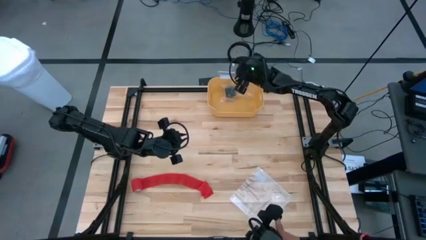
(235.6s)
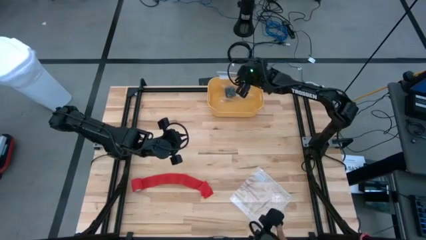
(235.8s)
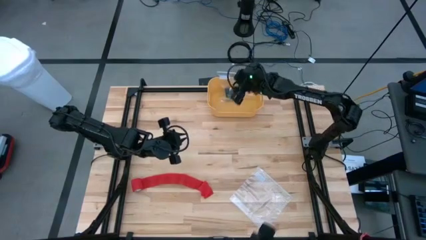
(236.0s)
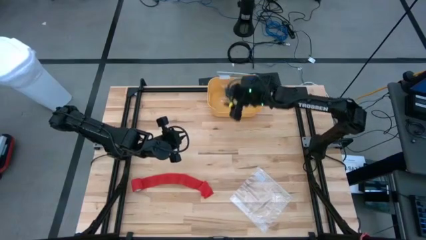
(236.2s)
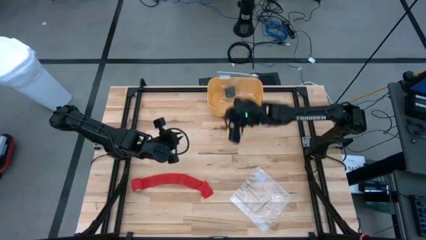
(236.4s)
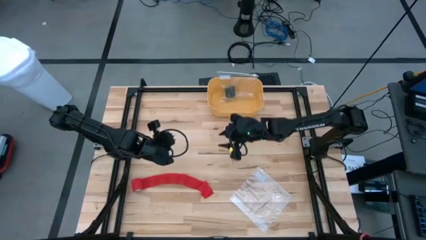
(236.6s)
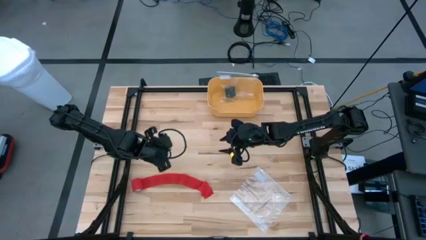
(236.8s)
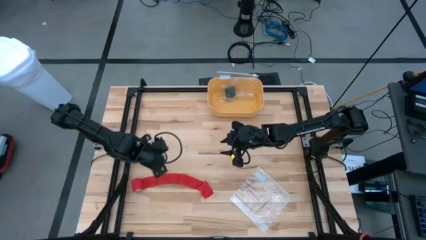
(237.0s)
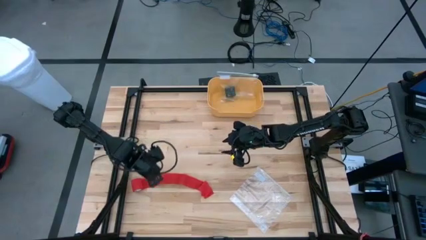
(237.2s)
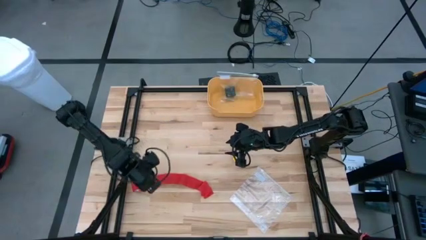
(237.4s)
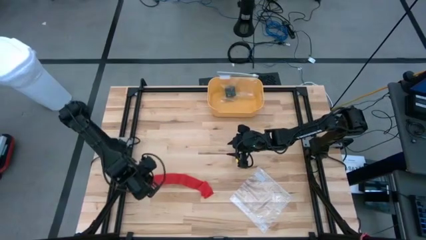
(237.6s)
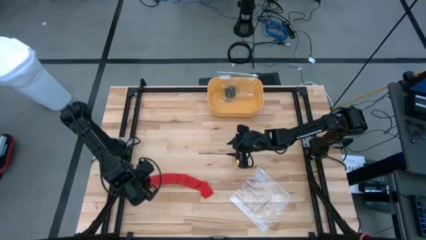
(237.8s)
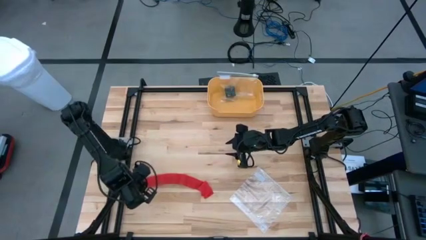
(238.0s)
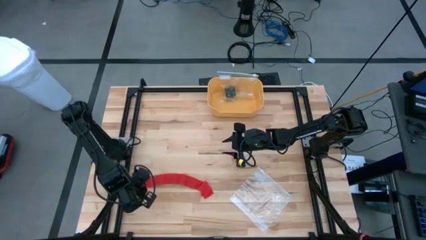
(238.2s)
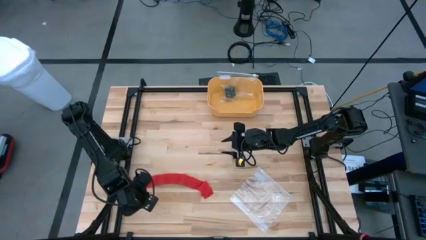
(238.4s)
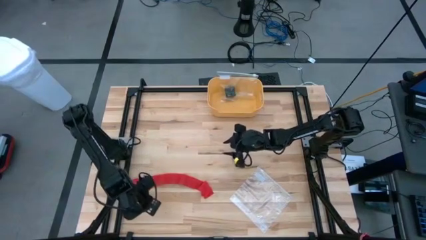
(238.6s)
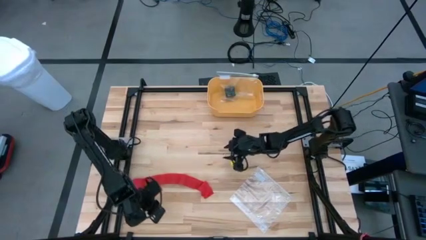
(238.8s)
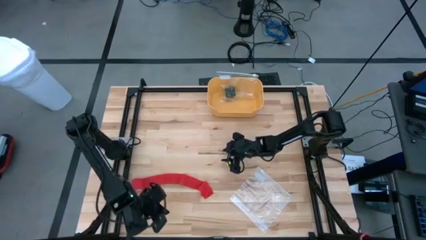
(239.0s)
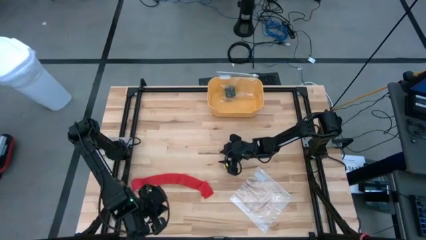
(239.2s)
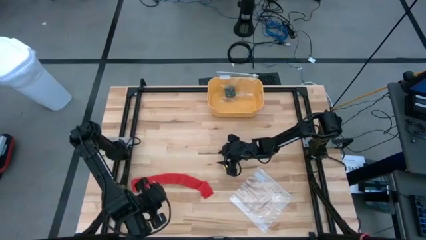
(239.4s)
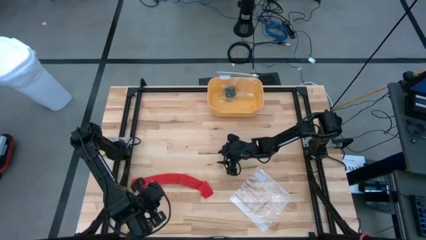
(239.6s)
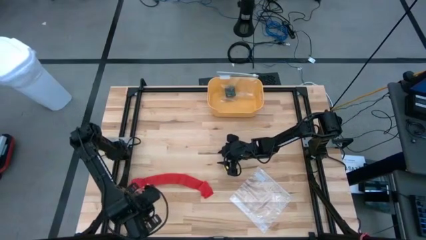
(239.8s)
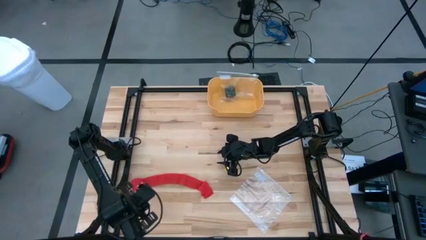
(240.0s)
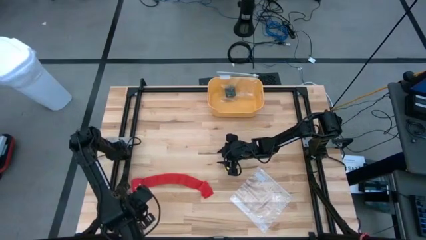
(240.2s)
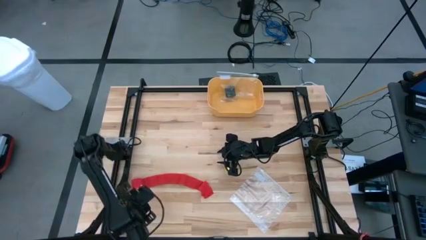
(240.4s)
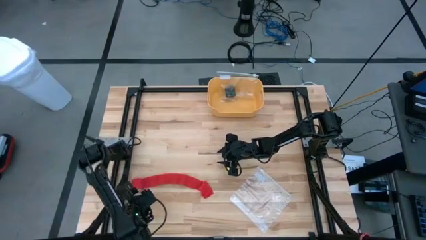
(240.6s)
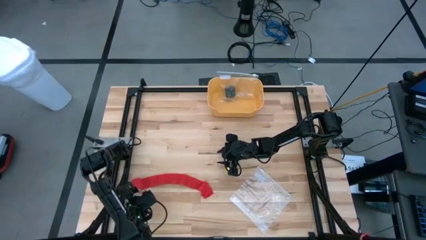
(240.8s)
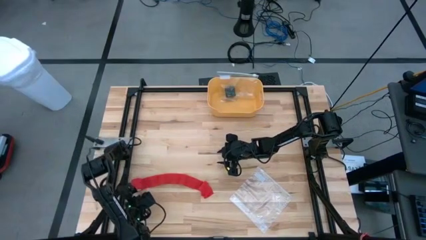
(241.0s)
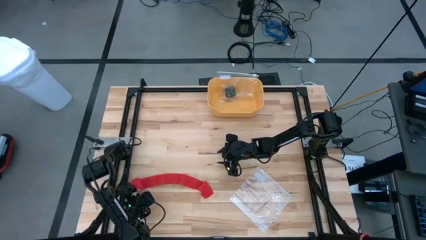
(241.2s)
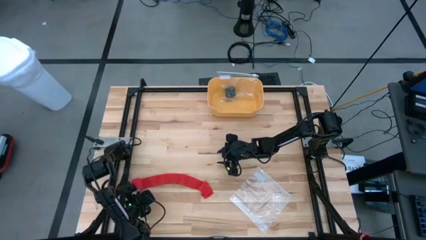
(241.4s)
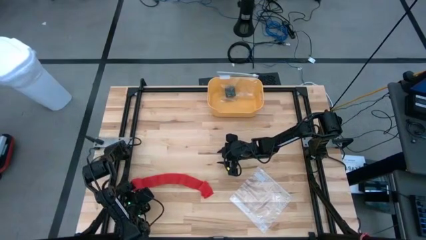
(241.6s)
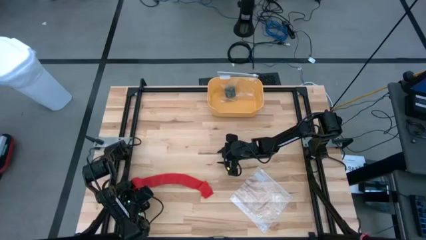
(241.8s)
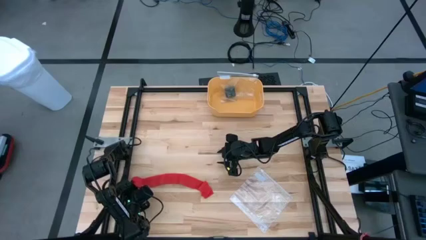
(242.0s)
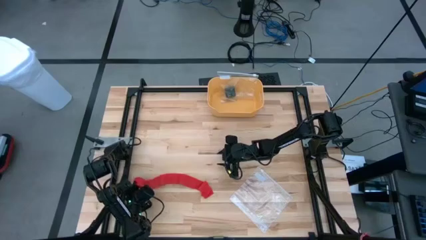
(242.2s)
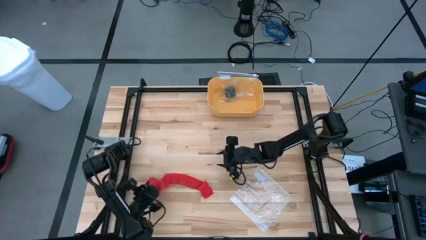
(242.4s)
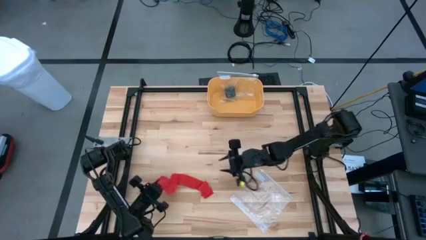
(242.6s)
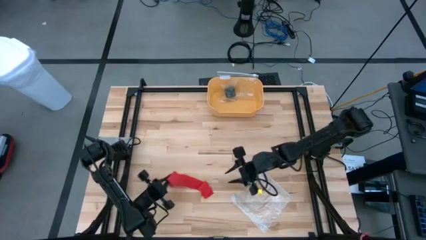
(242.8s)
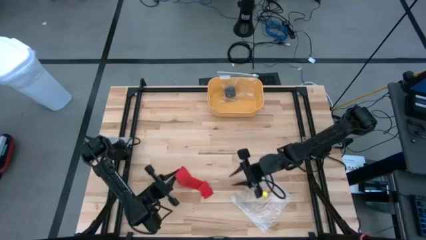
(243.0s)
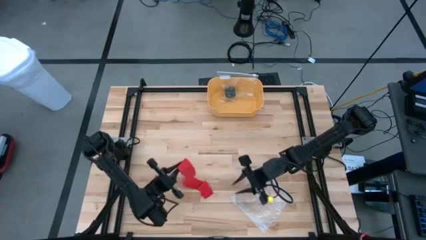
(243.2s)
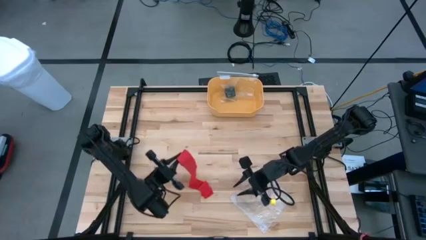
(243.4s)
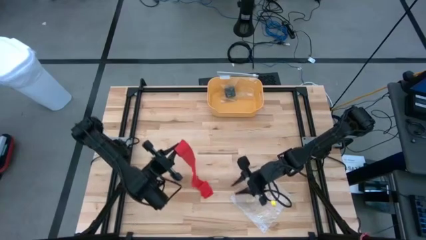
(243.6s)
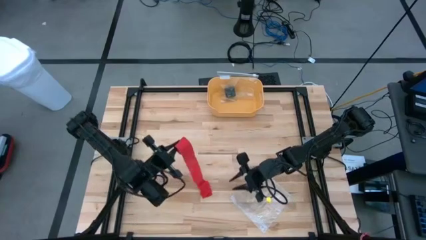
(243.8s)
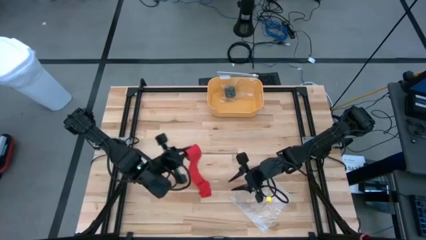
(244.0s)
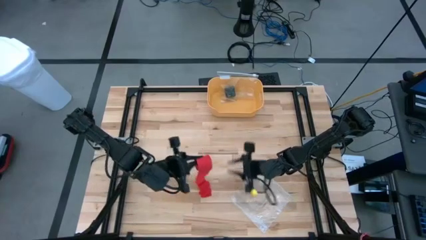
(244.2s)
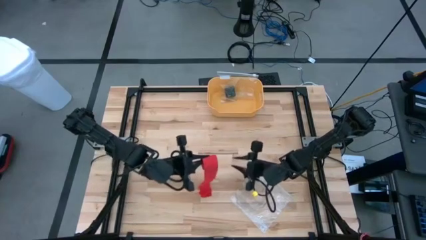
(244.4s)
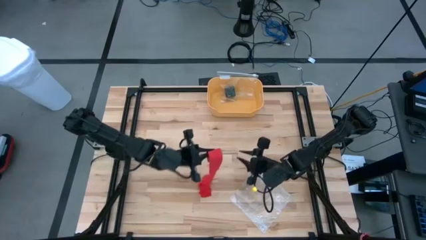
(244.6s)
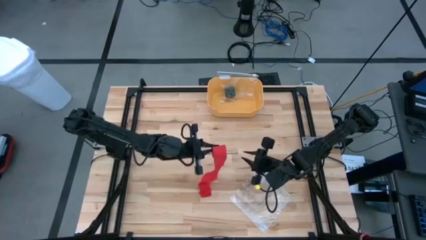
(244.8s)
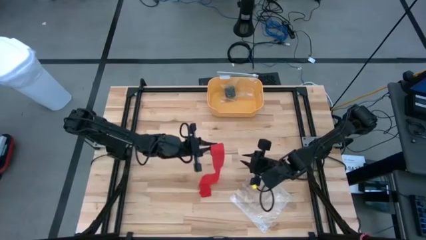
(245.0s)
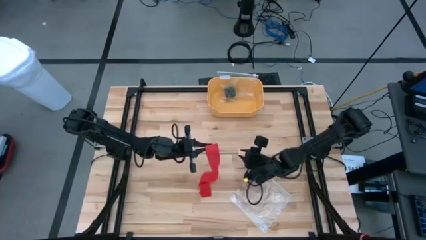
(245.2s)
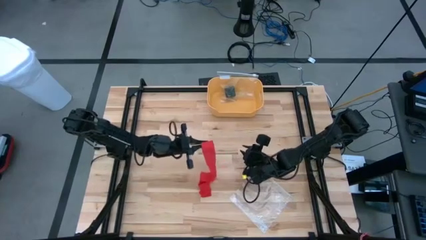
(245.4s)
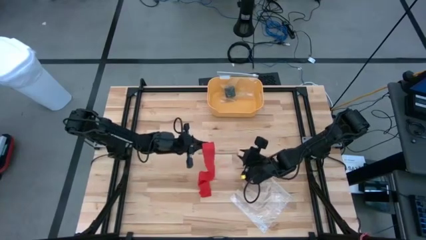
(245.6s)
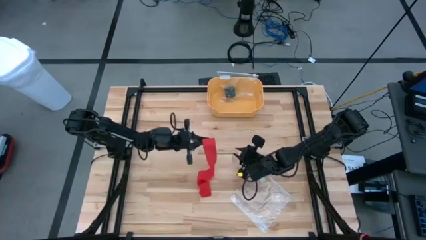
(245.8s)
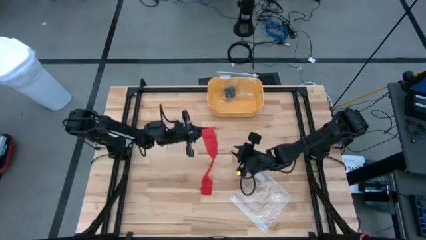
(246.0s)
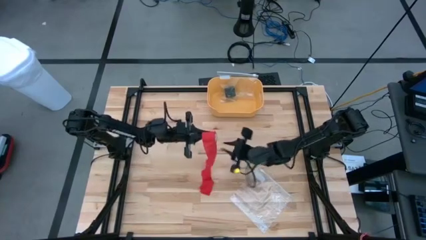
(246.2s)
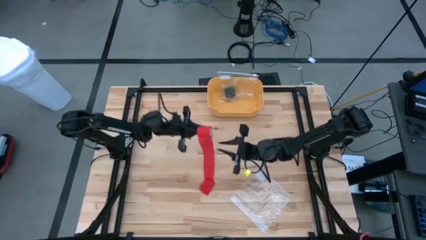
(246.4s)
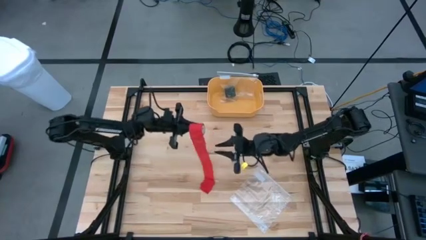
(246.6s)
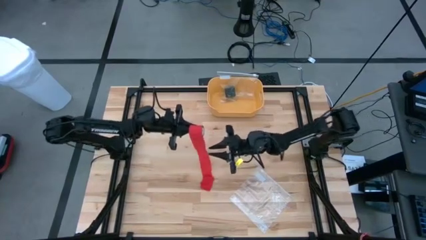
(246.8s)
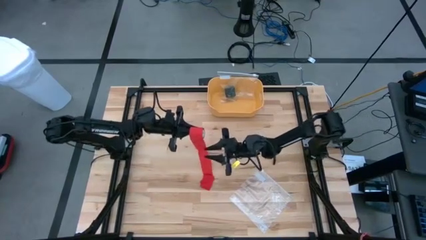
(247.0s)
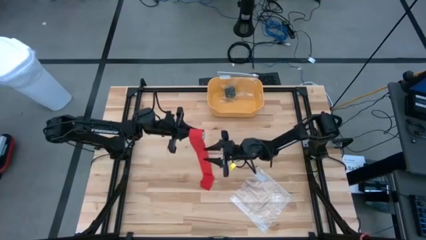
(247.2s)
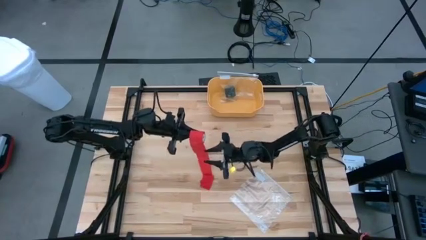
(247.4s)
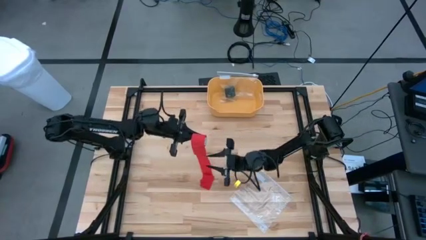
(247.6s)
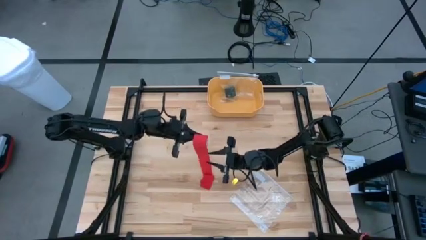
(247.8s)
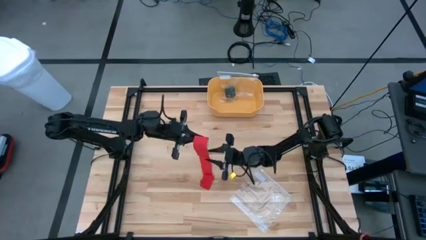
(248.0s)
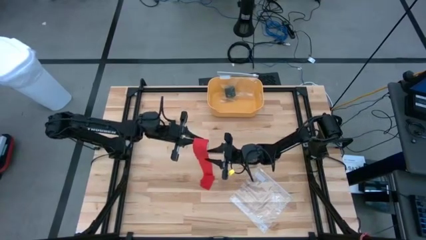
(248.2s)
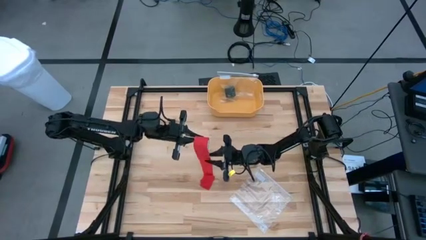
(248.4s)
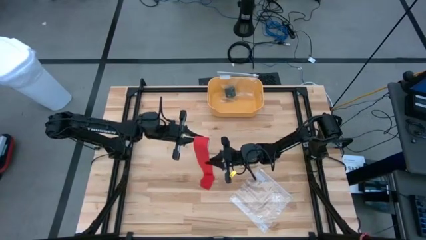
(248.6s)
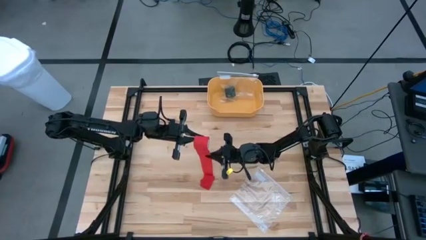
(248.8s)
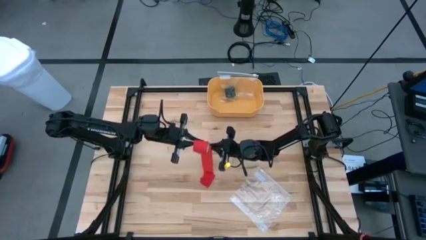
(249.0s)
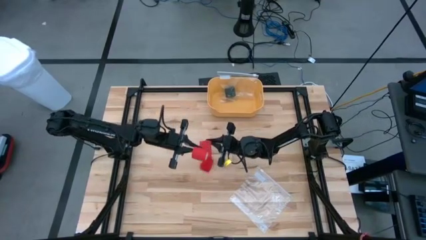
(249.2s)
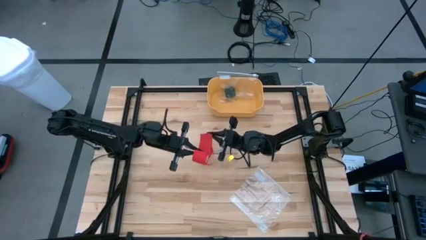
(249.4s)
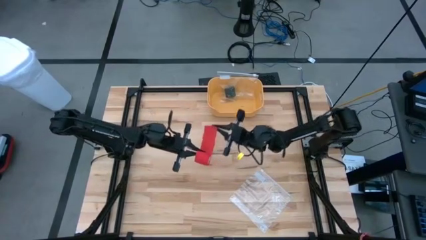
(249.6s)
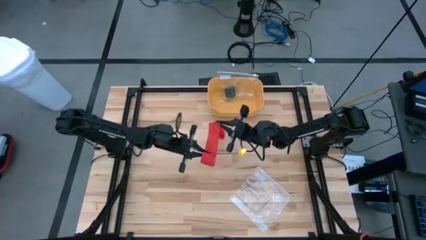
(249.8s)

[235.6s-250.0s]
Task: Roll bandage
Roll the red bandage
